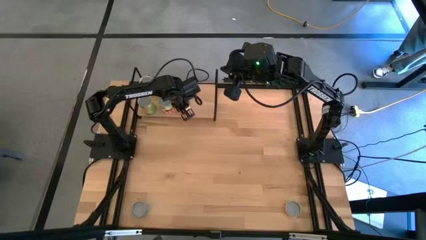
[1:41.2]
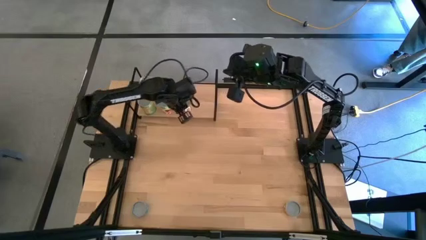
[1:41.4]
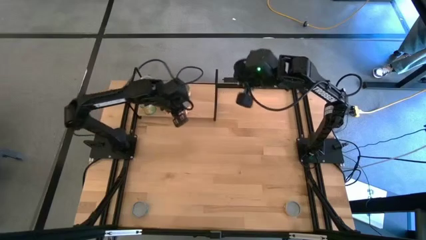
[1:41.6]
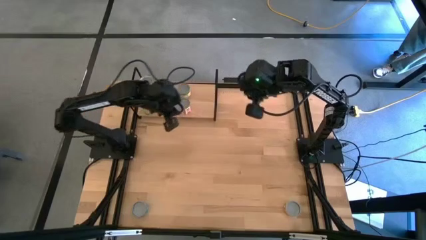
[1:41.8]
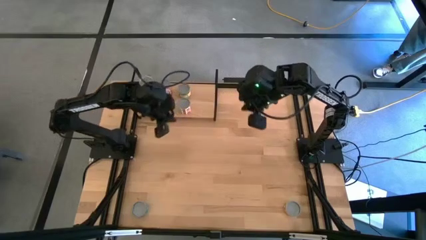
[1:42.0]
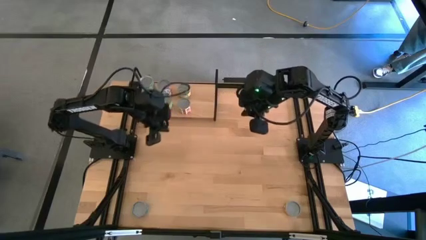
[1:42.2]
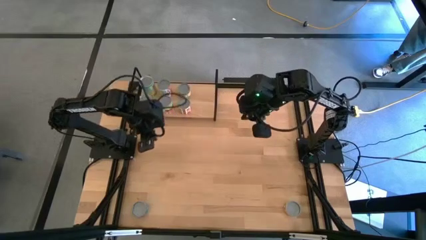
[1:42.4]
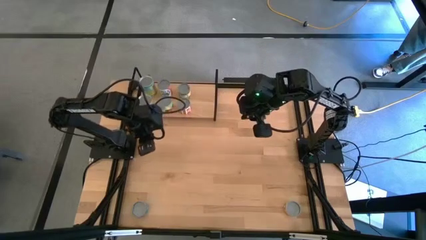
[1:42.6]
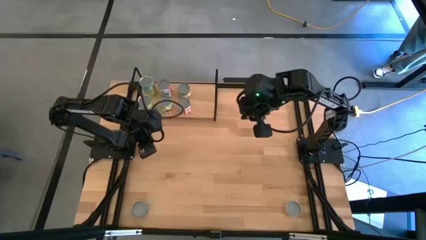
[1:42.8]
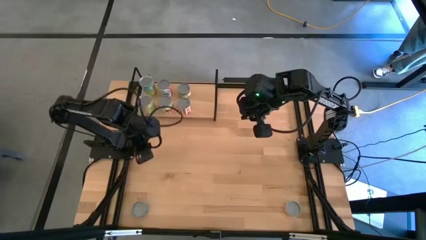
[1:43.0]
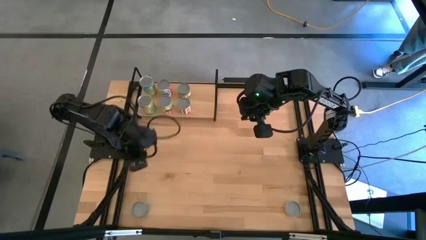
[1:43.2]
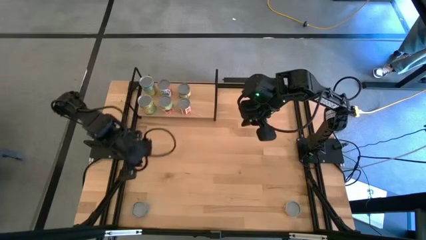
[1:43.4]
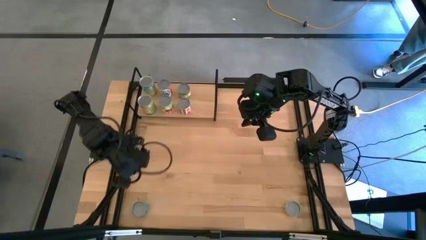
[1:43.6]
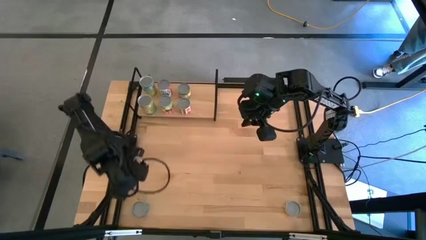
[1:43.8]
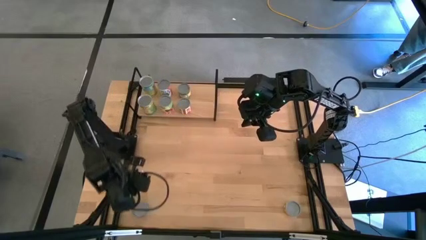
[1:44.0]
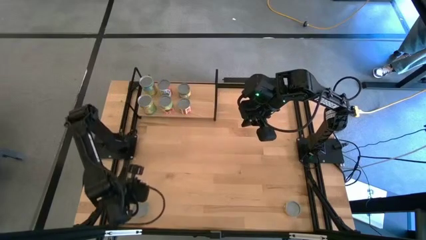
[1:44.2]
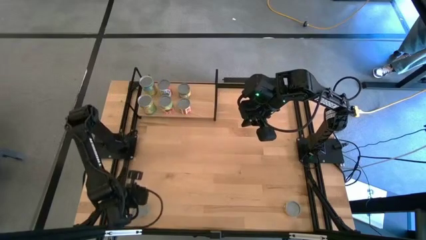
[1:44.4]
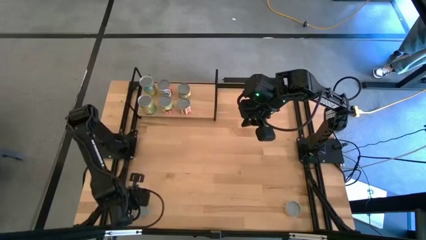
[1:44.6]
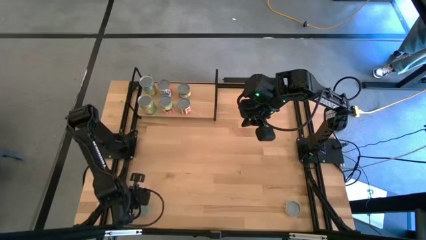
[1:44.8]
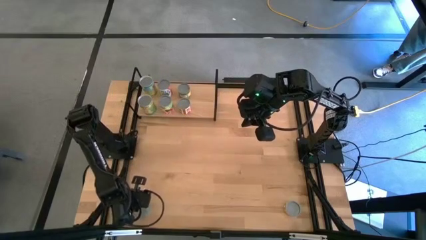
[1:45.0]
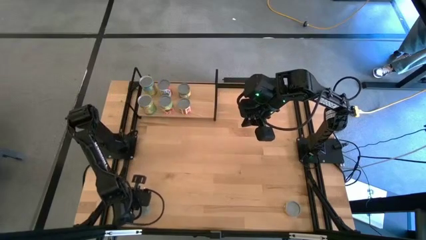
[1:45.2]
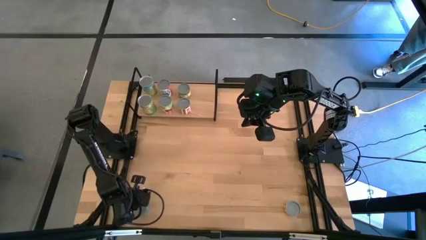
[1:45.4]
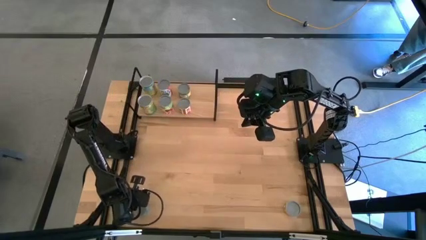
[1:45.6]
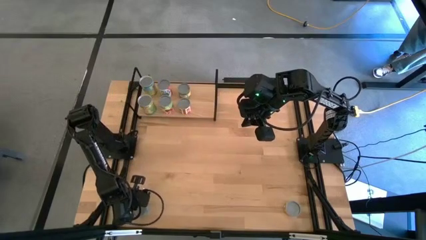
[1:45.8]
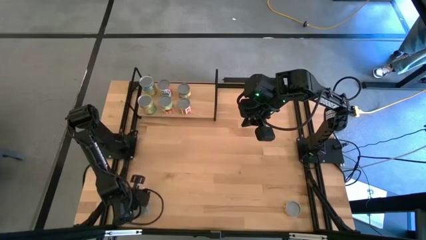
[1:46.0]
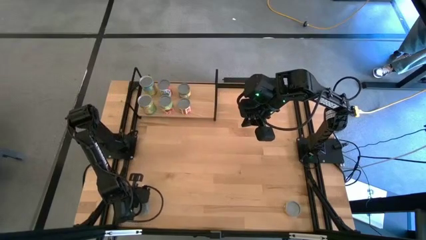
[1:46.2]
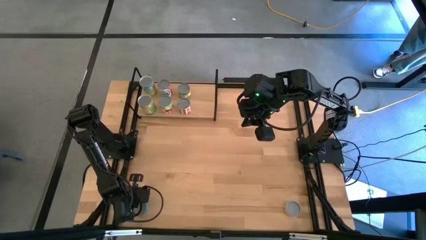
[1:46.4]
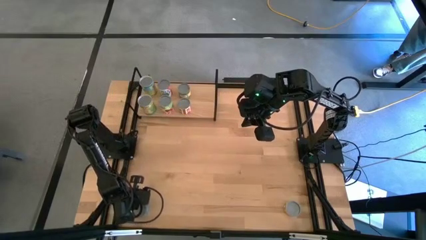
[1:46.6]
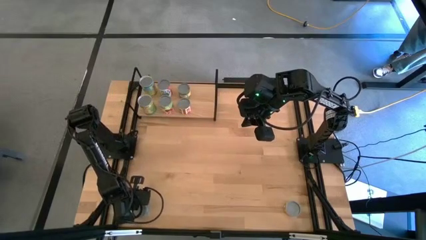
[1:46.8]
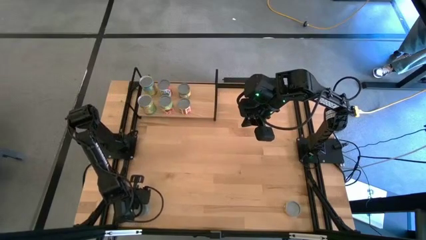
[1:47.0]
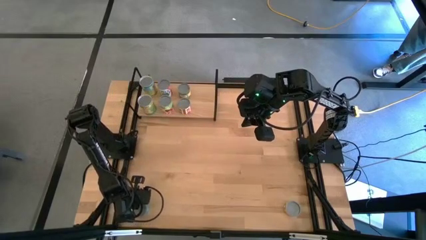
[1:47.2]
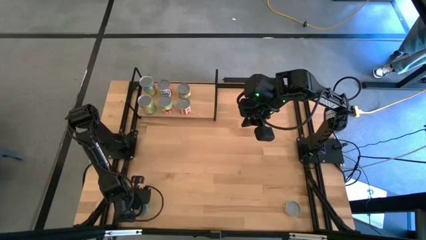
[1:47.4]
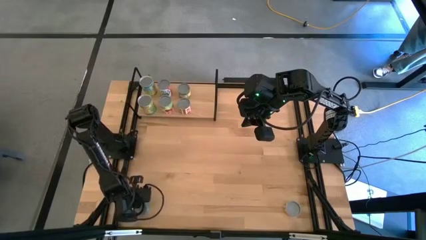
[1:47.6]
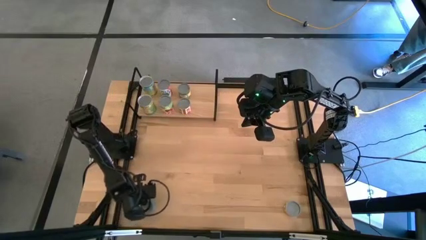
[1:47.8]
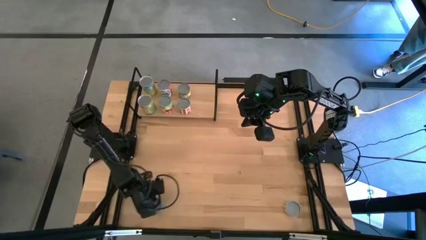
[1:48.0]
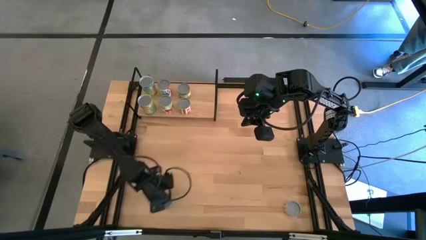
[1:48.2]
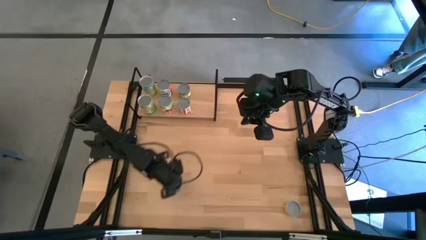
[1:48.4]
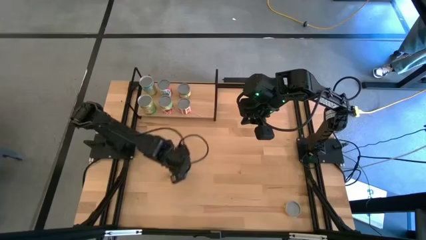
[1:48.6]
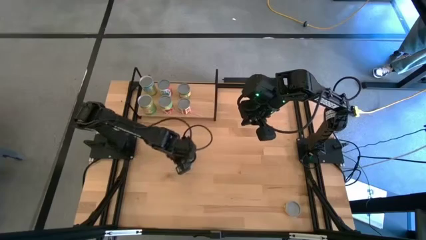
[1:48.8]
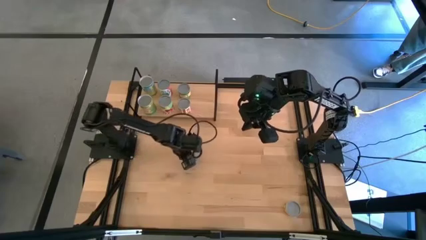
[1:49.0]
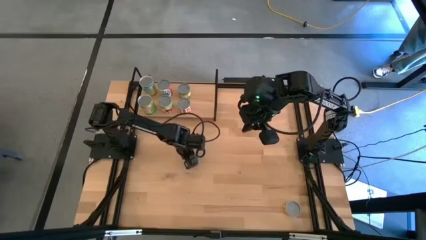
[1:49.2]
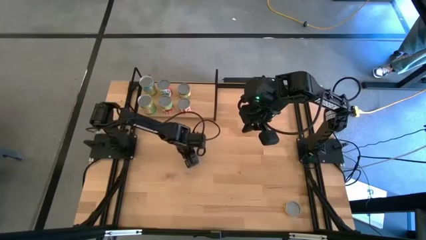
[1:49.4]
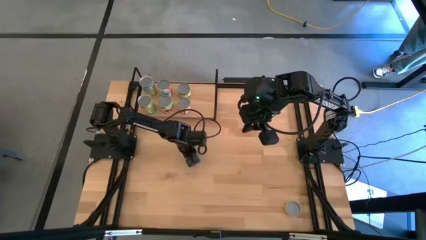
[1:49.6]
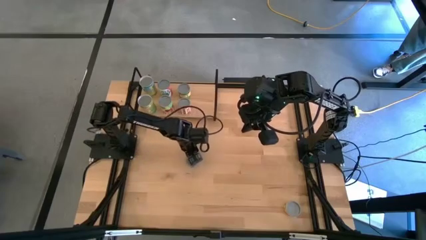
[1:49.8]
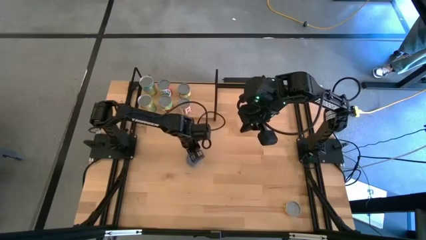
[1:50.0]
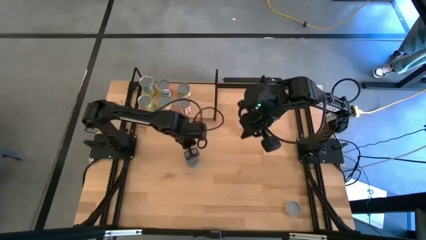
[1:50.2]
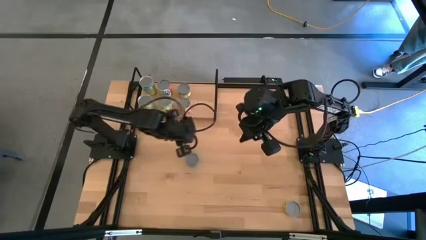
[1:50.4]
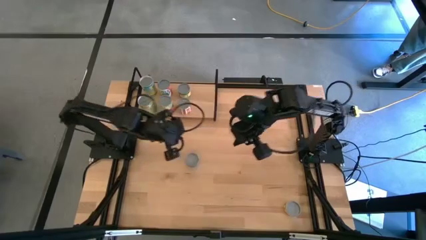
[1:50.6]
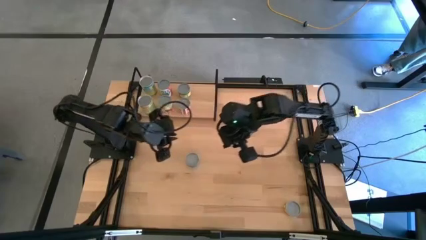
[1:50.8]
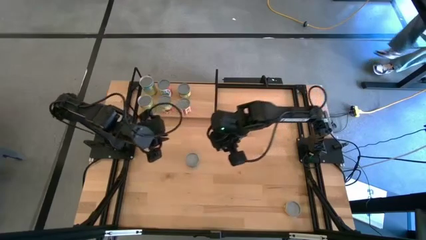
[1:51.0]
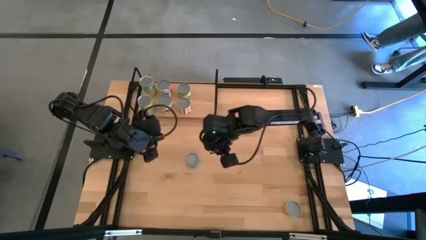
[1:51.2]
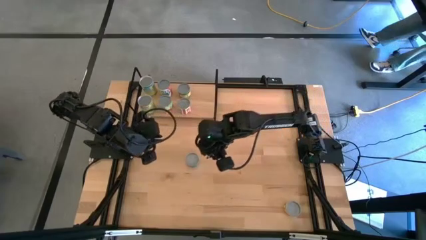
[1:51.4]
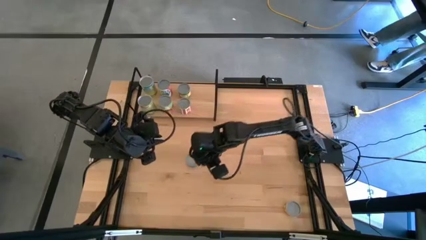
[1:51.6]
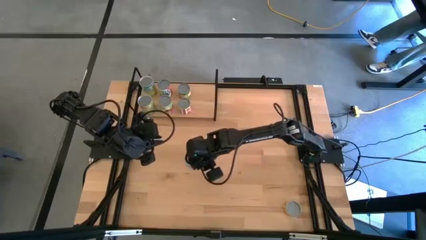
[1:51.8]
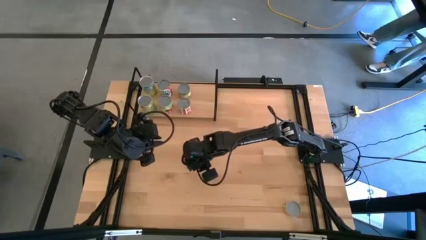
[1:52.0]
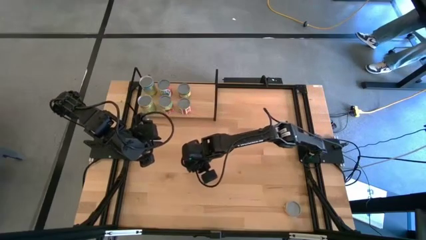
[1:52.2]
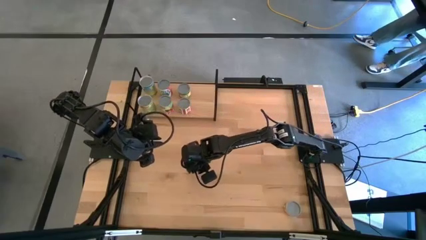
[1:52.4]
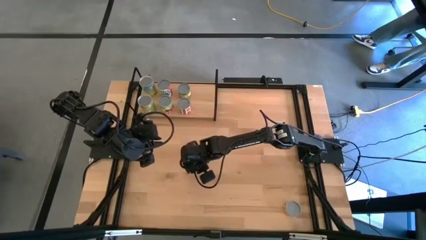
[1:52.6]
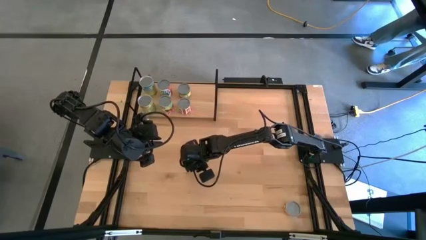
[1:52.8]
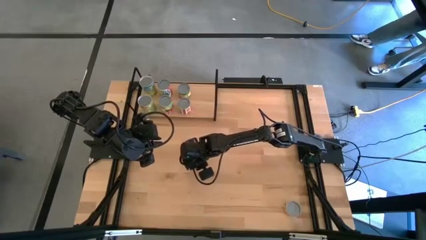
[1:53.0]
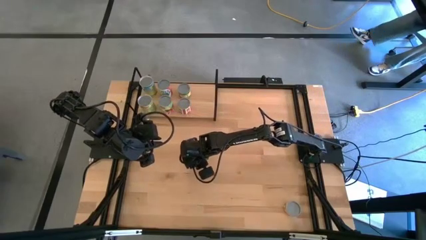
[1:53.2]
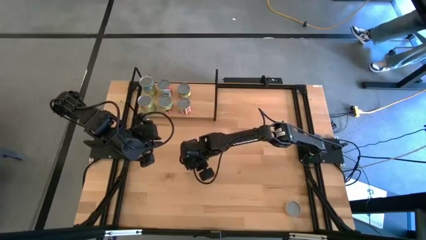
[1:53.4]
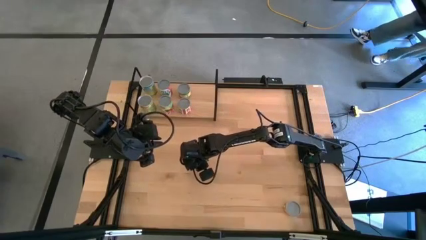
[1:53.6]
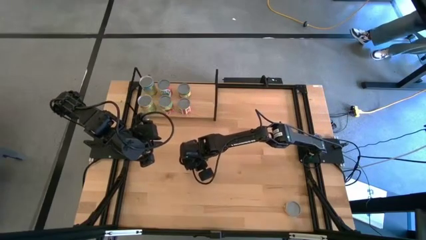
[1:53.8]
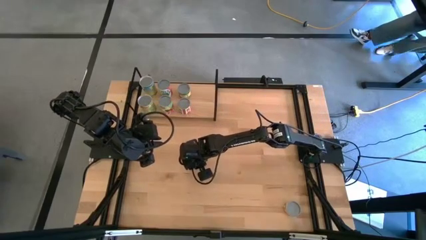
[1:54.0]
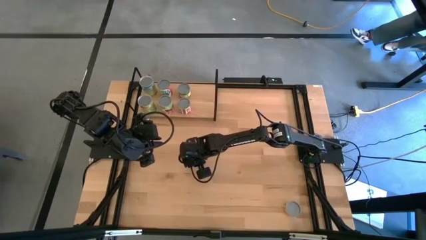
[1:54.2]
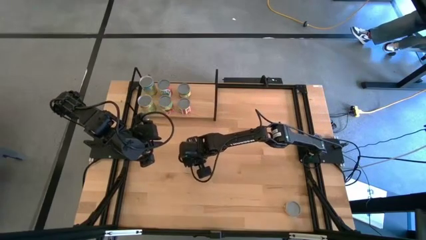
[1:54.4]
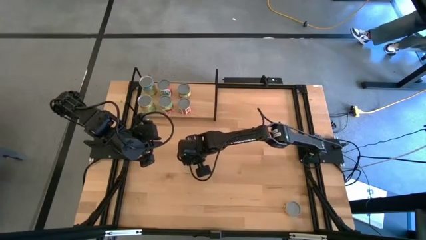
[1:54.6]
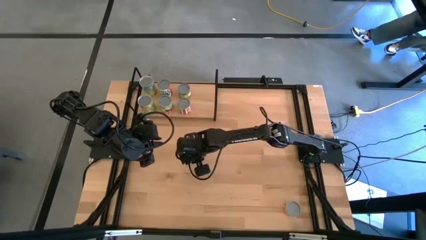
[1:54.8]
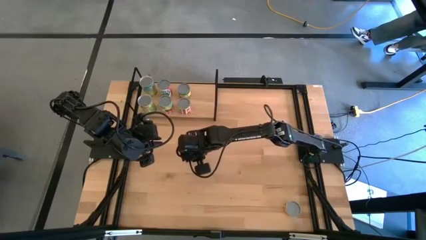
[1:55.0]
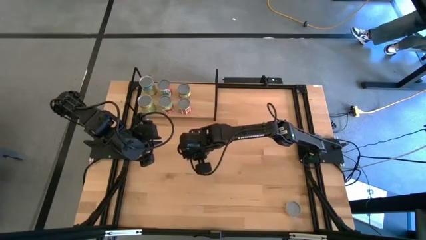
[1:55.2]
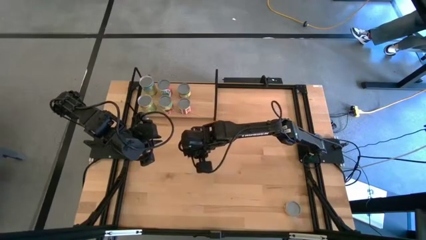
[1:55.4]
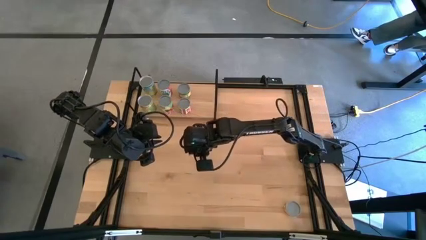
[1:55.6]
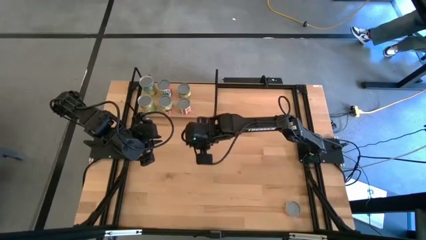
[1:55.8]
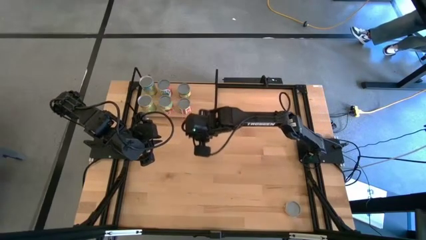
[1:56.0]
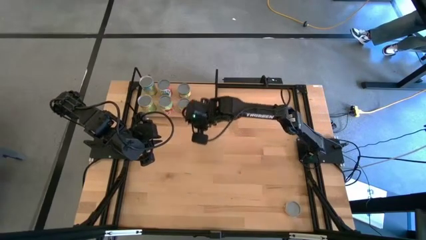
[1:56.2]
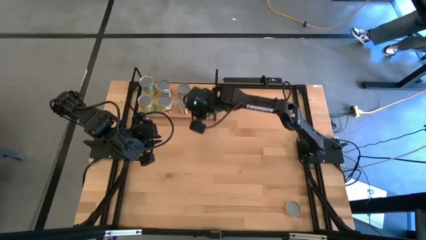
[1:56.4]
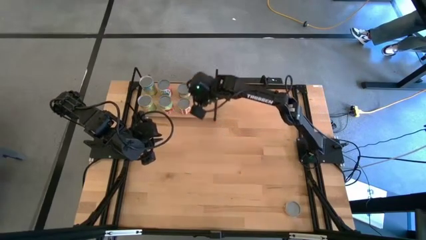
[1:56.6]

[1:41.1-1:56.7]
Task: Pick and place cans onto a shelf
Put the canned tuna on the shelf

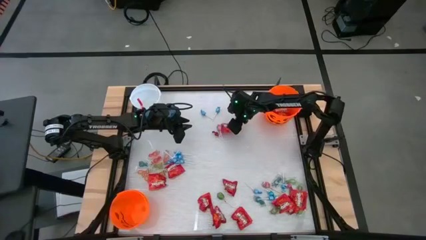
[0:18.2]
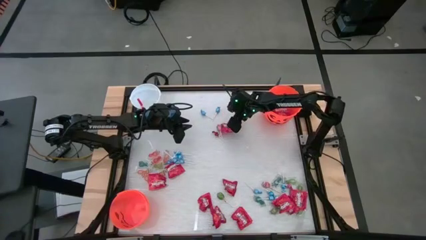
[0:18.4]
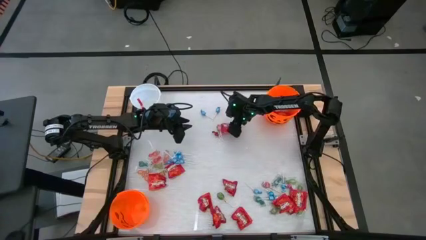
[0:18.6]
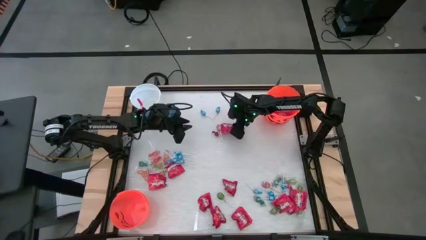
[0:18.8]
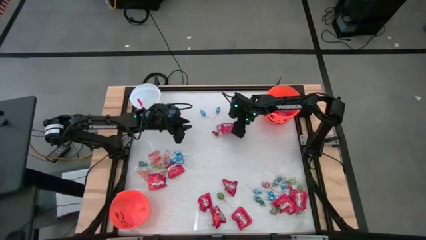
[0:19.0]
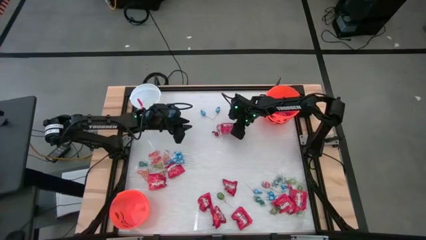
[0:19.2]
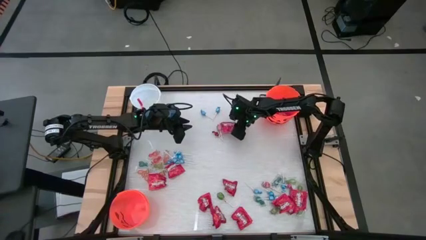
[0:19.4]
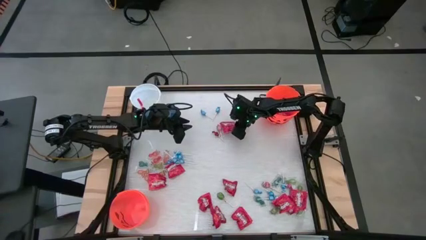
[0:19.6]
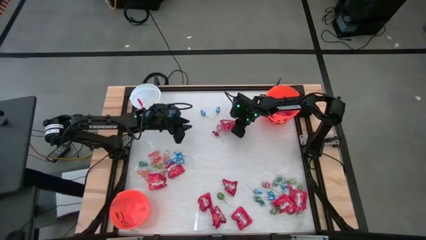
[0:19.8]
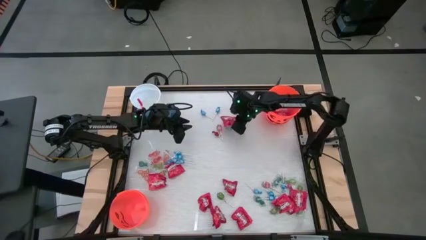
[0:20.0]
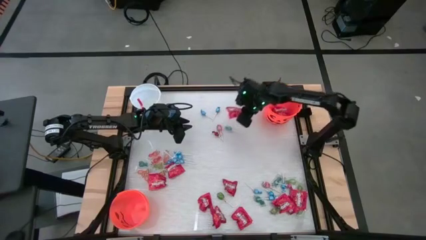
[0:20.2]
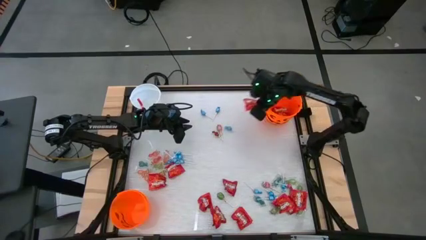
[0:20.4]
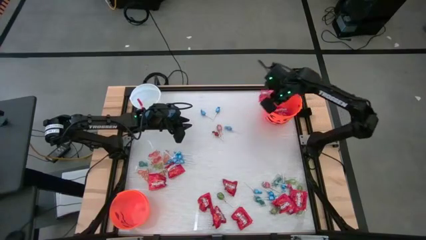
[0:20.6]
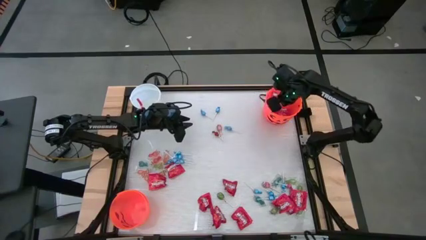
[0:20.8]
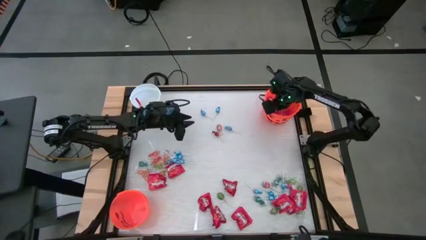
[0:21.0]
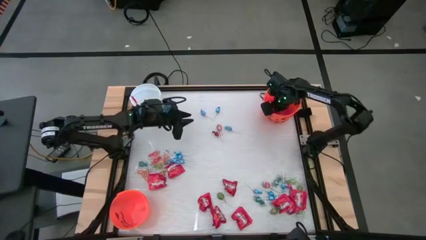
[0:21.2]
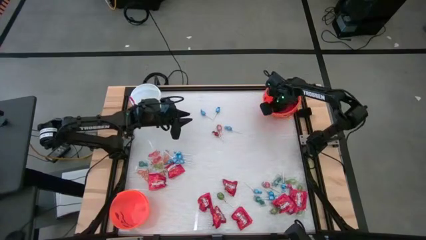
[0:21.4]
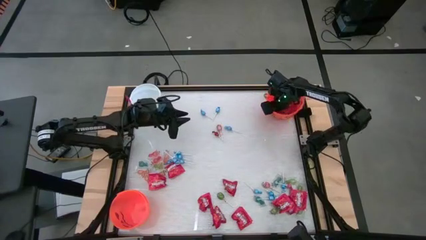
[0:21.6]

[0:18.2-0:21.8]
Task: Sort candy by brand, put in halloween buckets
Put the red candy into the top orange bucket
